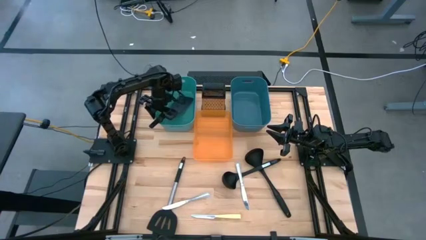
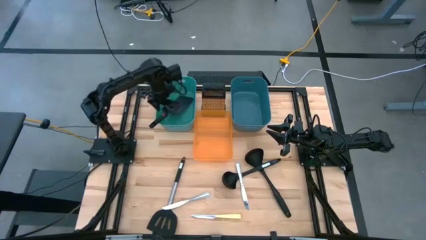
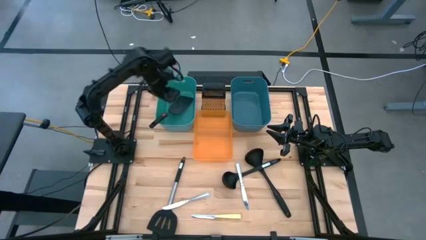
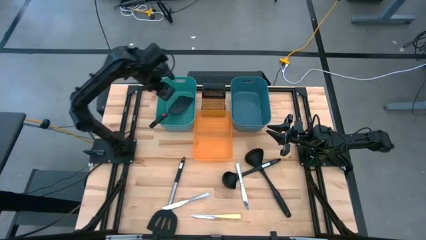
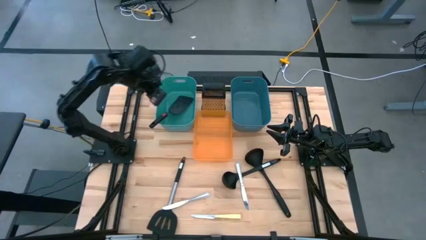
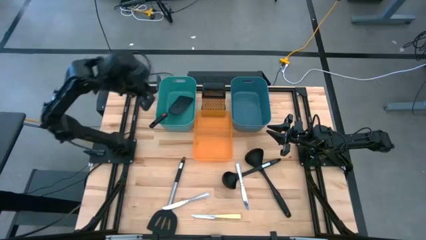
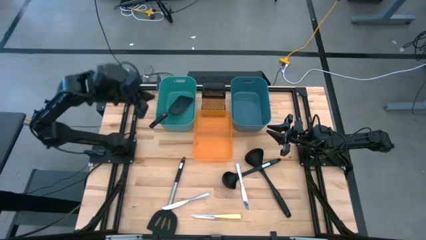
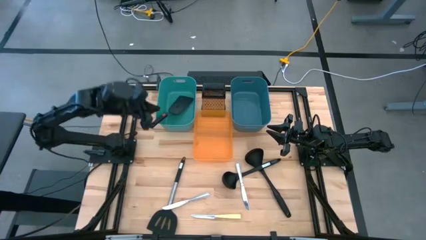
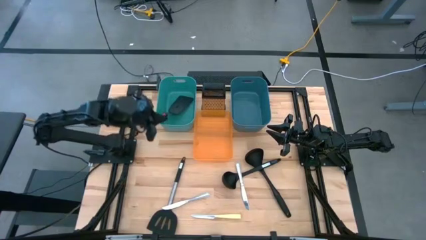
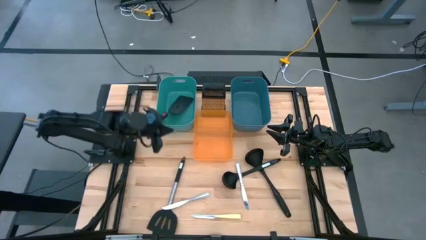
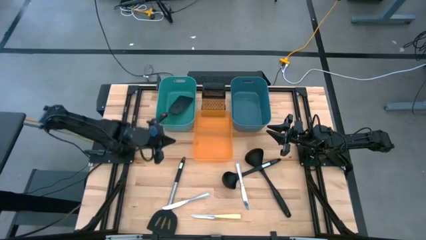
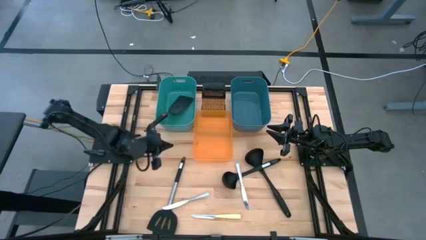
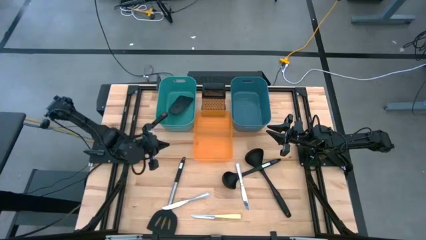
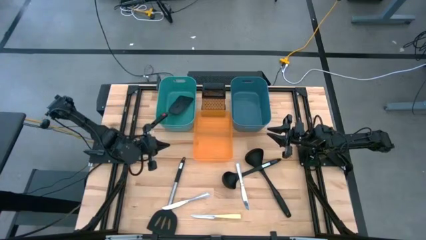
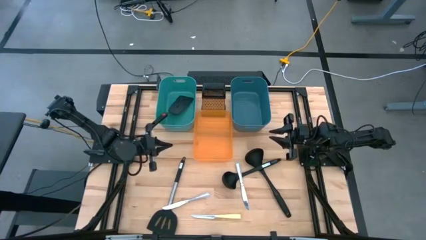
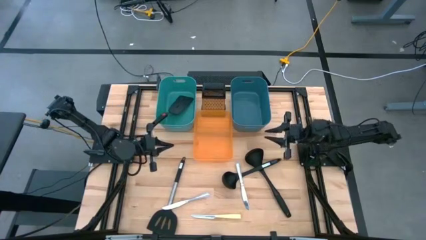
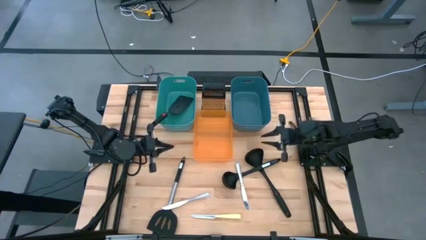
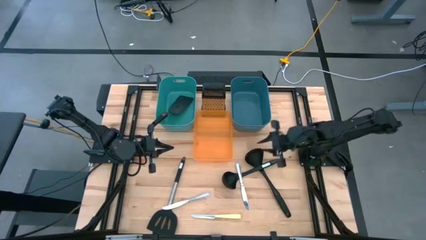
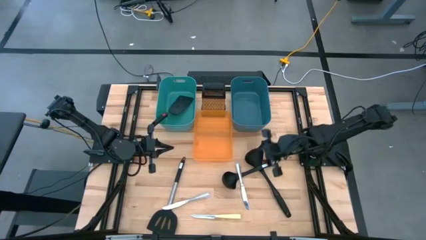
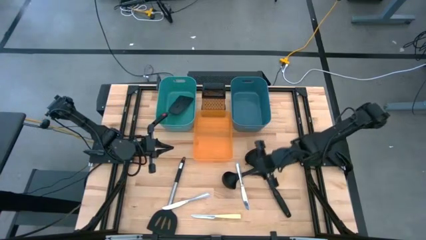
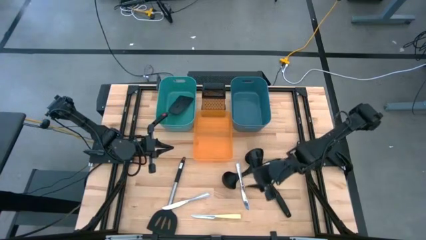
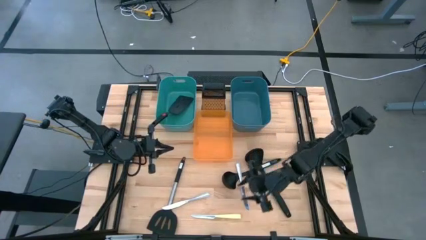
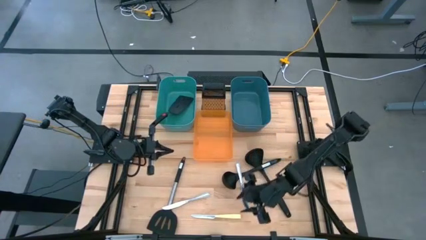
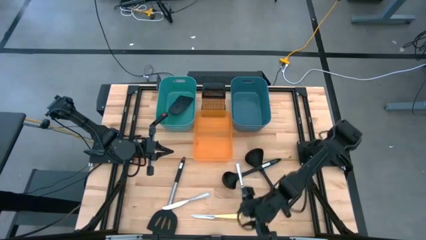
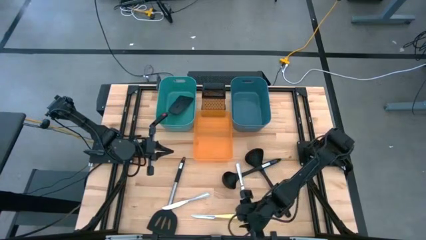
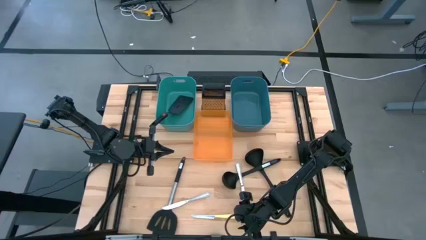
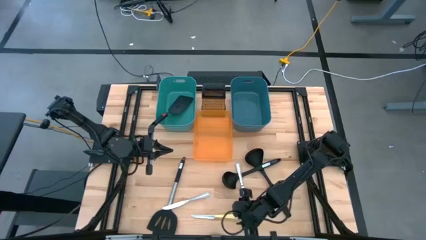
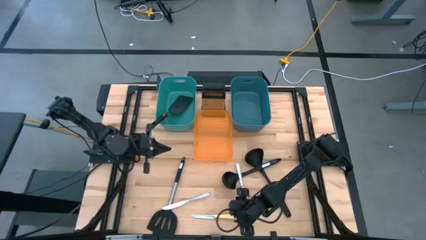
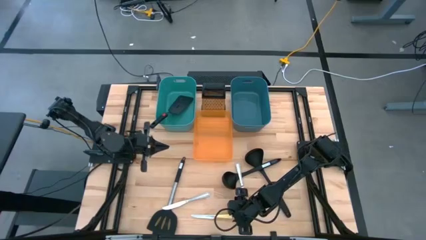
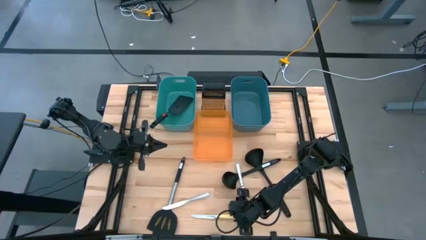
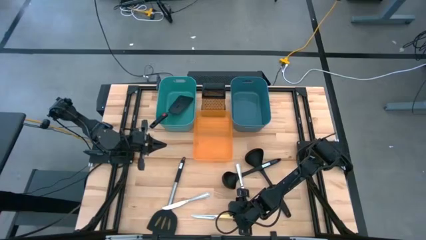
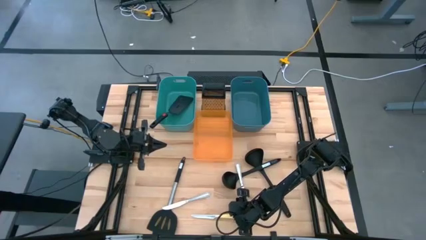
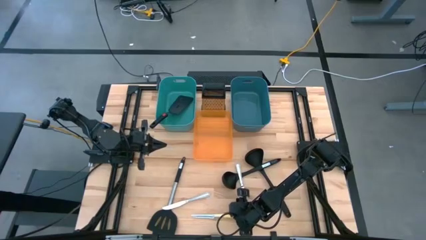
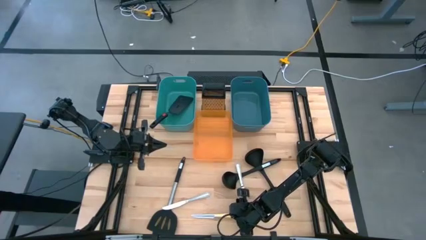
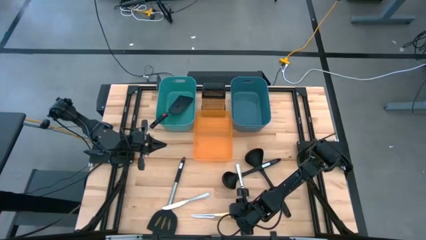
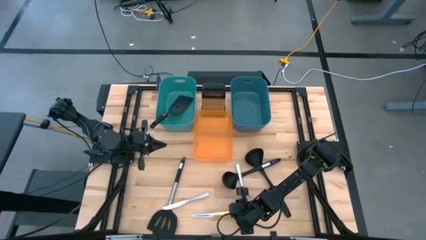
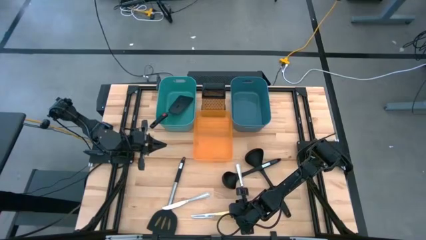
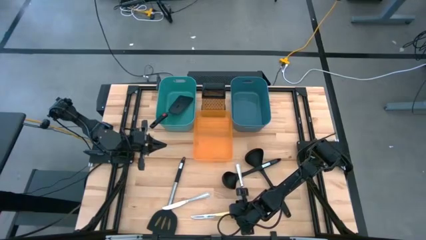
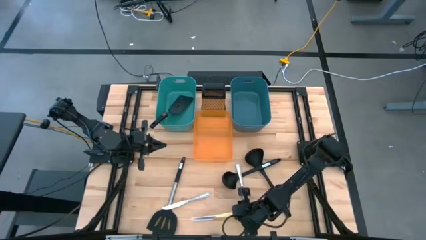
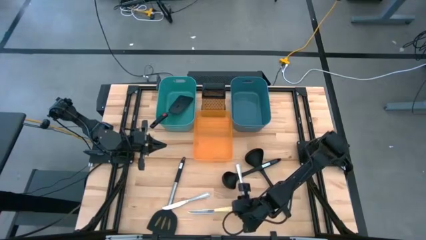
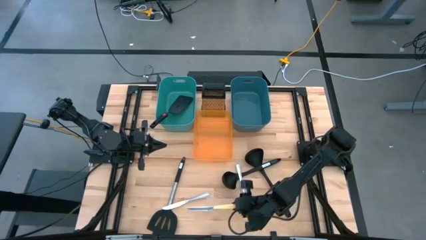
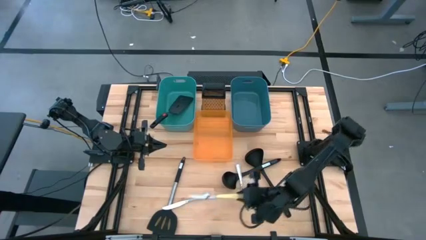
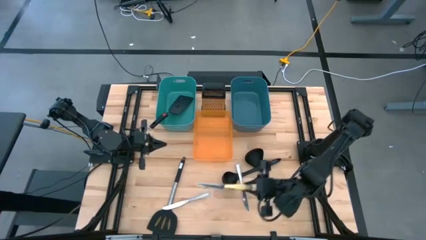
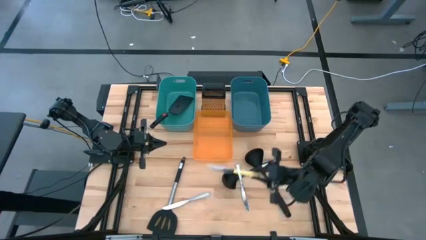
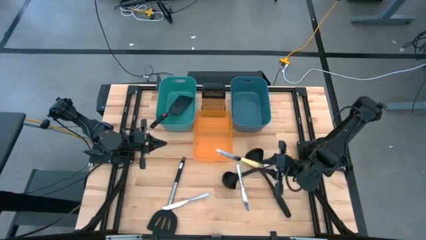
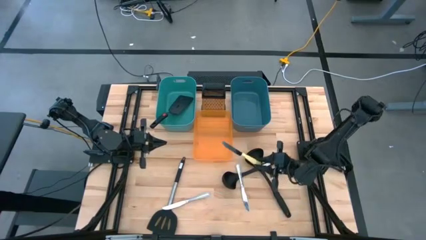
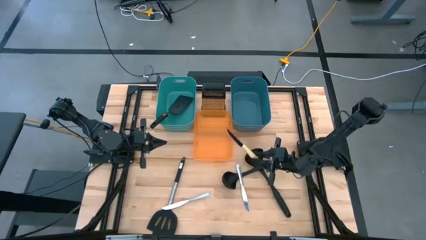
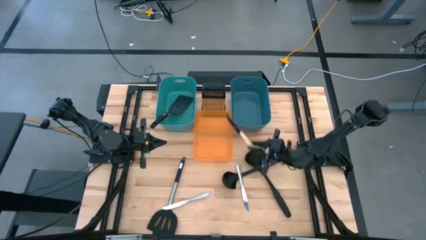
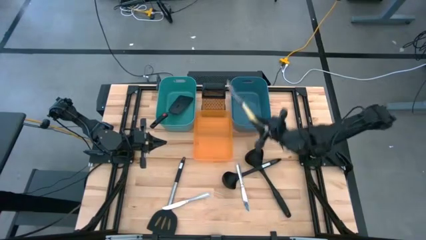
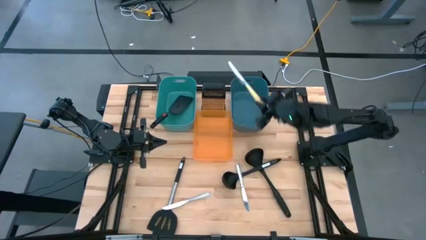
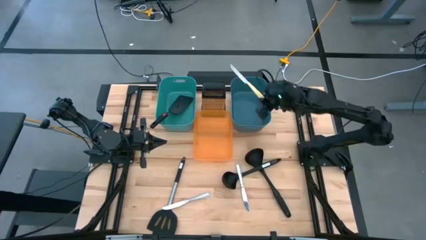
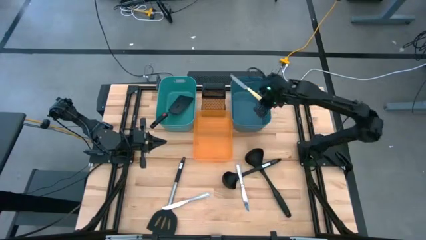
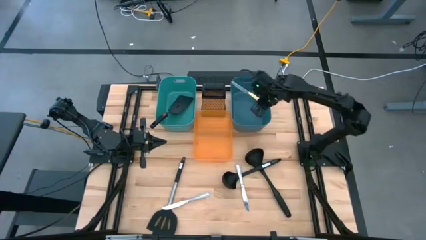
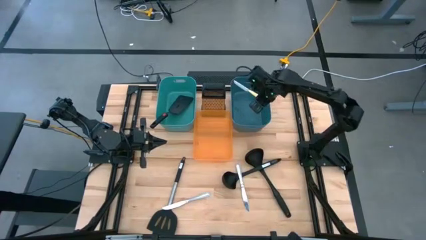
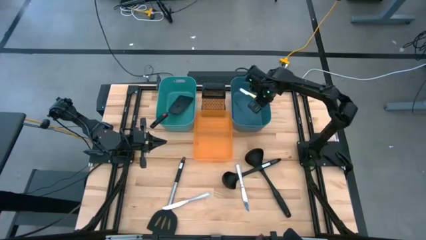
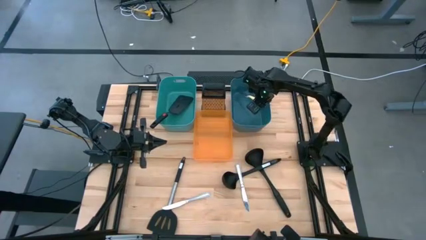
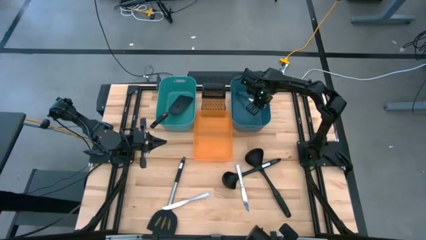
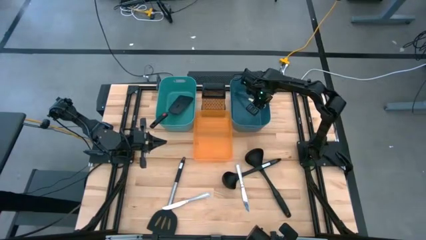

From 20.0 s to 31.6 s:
Task: Pick & Place Kitchen Items
Put the yellow knife into the blue bin

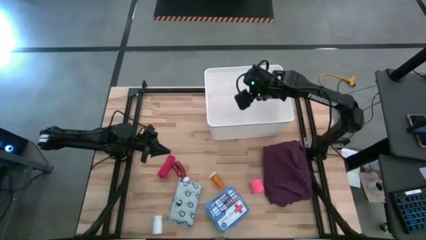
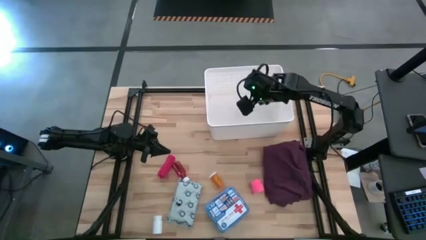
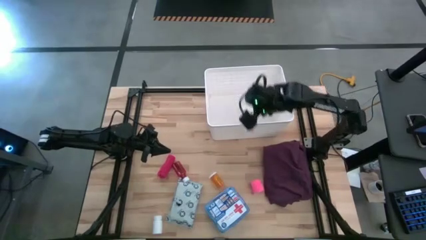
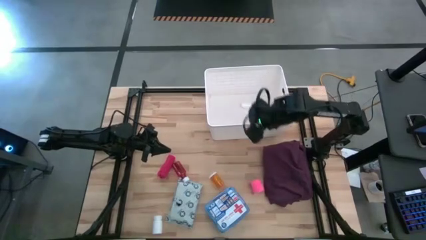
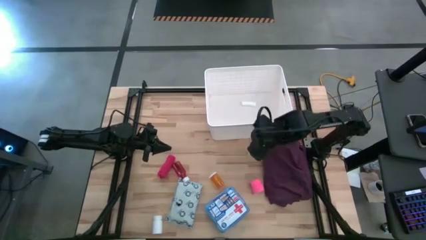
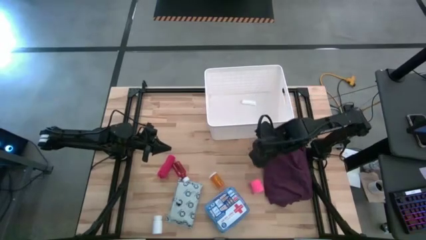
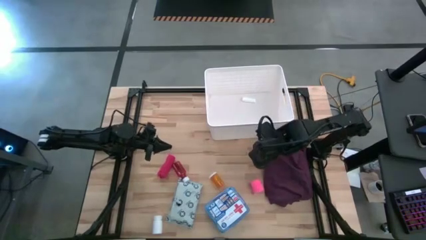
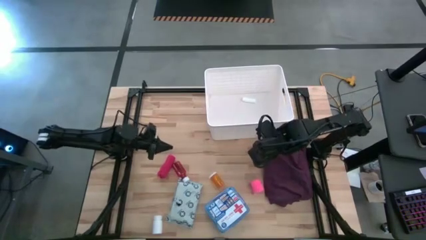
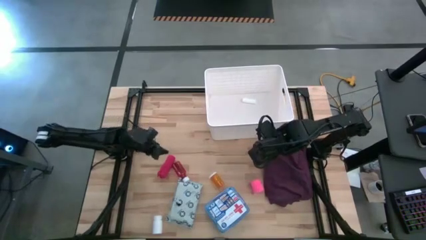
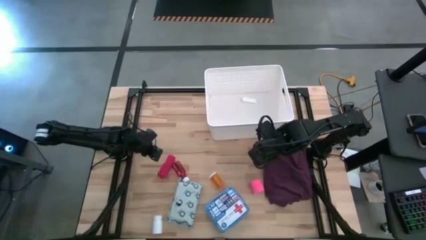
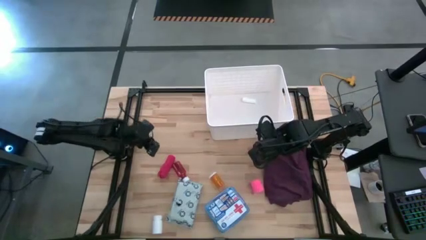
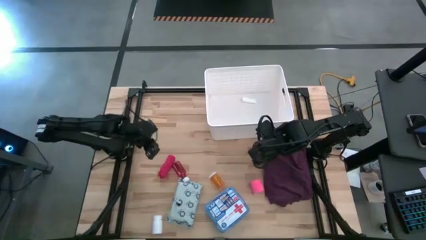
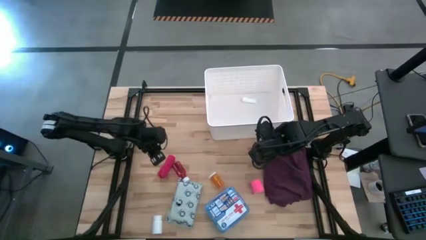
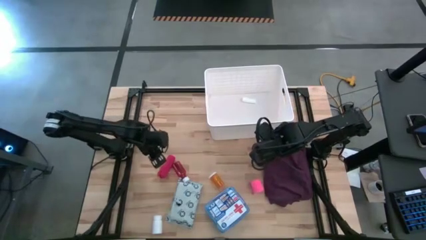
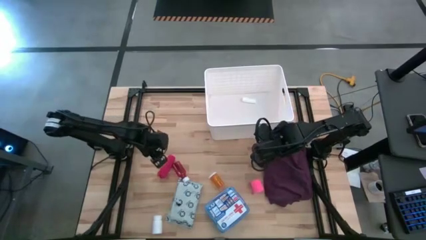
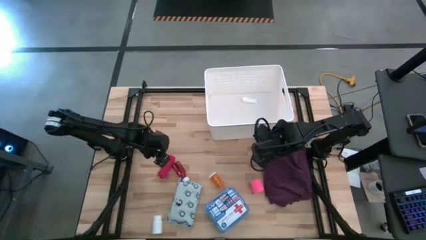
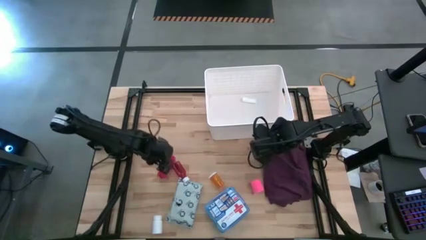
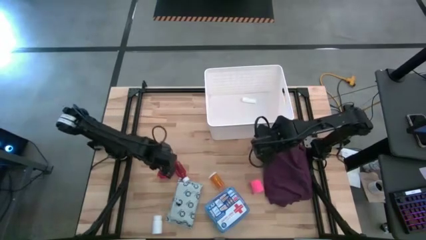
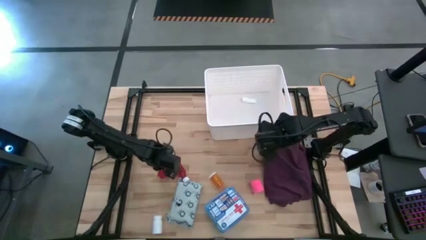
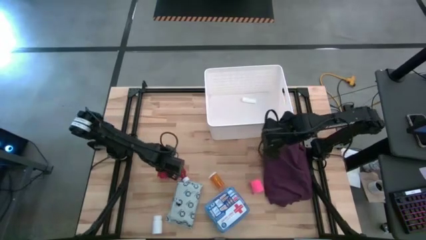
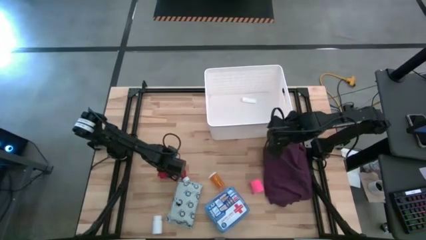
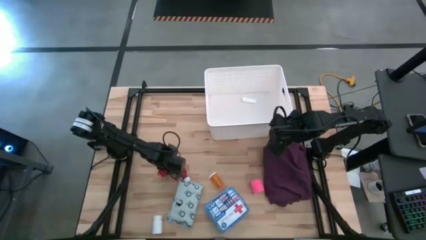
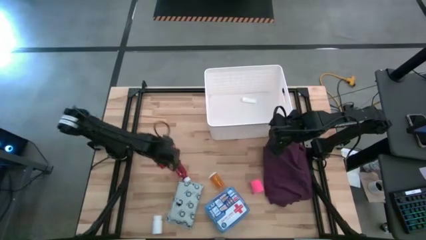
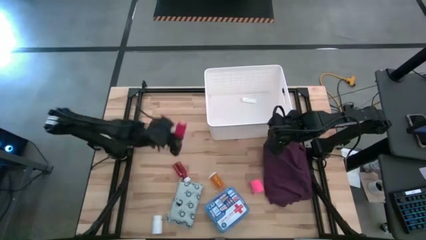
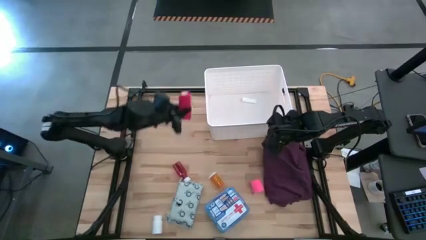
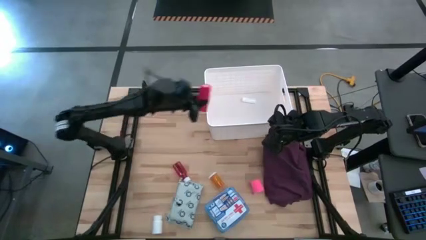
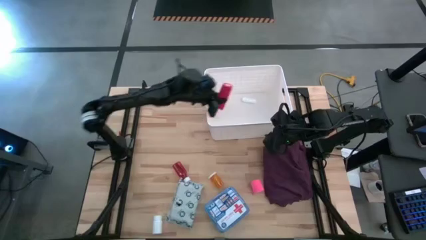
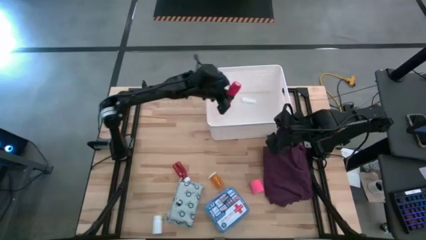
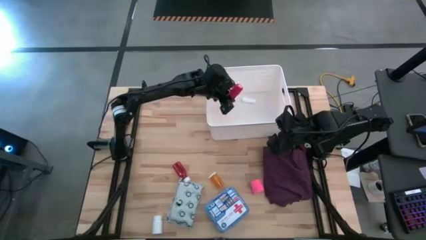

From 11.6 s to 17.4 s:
Task: Pick & place medical supplies in basket/bin
Put the red bandage into the white bin
